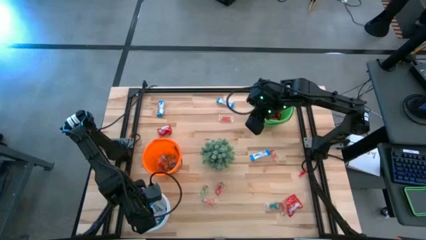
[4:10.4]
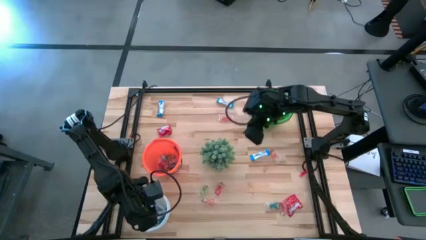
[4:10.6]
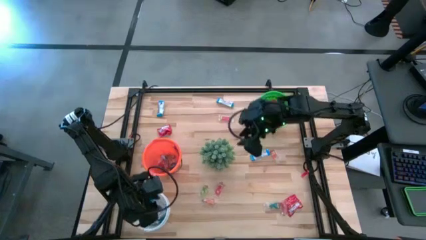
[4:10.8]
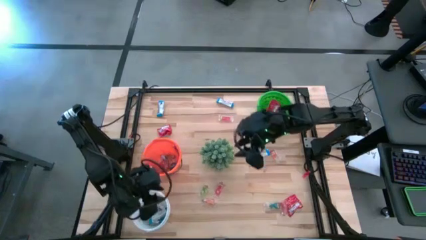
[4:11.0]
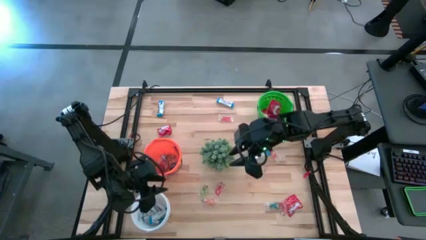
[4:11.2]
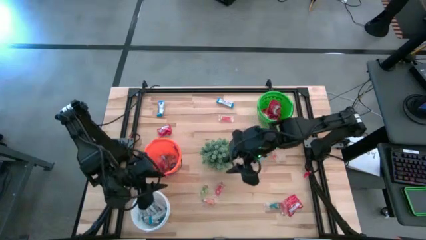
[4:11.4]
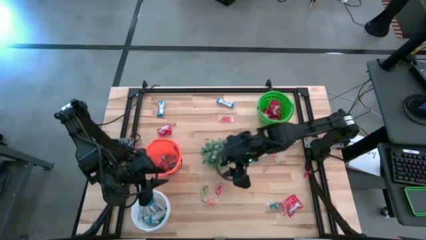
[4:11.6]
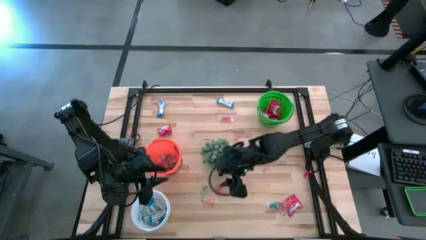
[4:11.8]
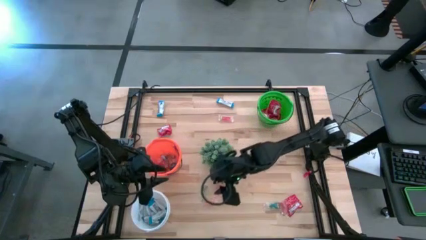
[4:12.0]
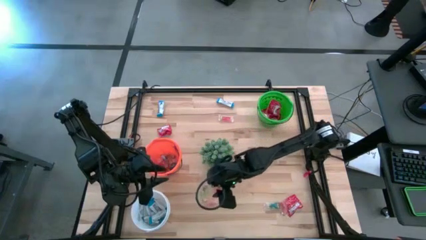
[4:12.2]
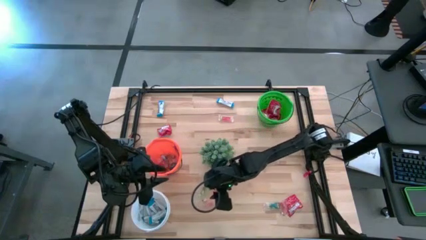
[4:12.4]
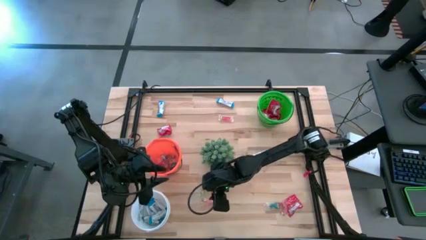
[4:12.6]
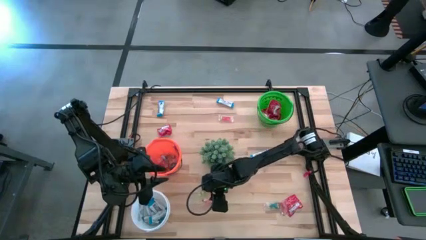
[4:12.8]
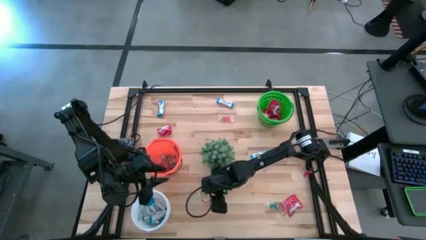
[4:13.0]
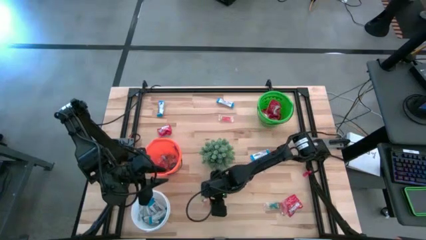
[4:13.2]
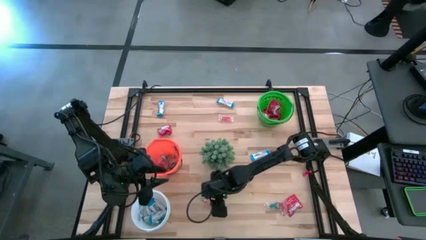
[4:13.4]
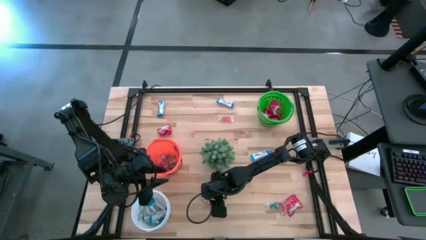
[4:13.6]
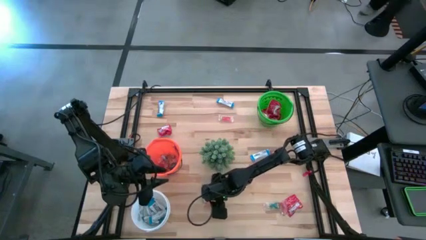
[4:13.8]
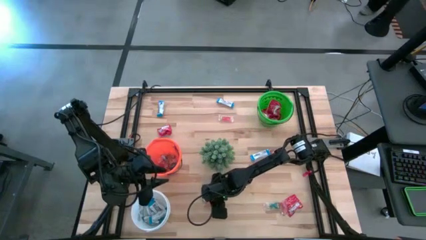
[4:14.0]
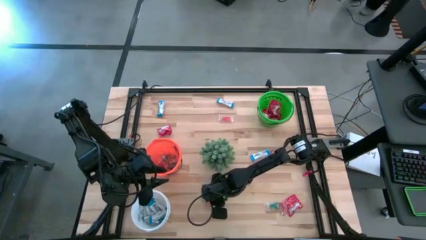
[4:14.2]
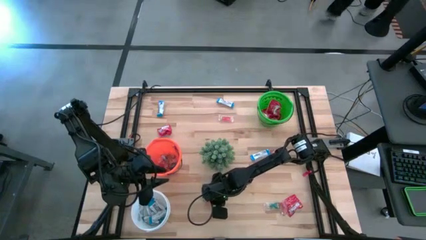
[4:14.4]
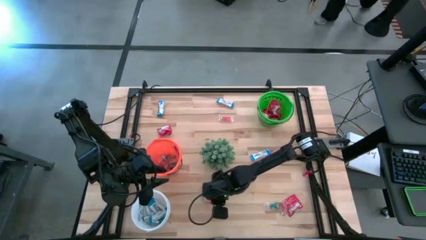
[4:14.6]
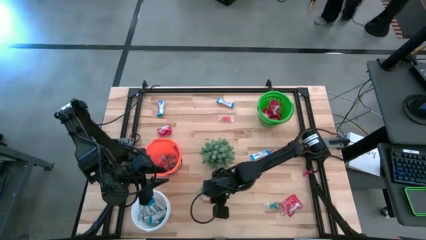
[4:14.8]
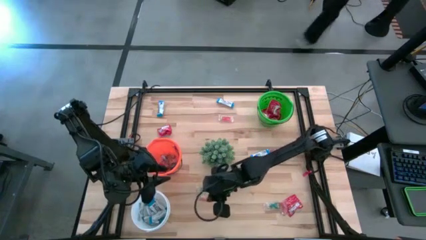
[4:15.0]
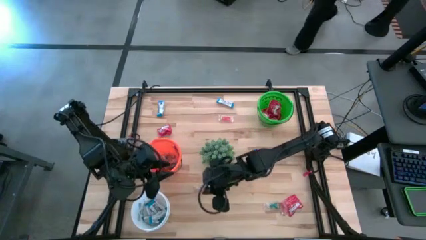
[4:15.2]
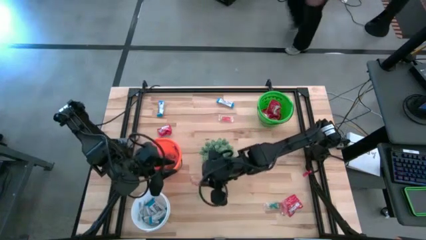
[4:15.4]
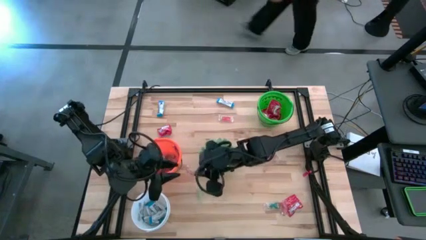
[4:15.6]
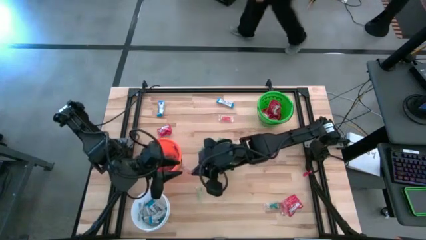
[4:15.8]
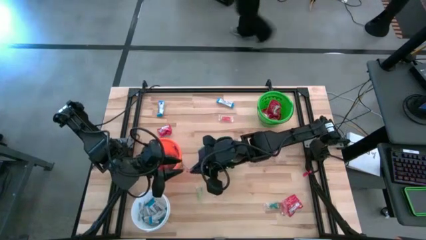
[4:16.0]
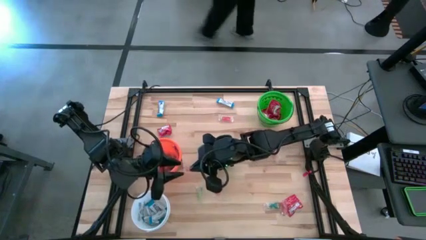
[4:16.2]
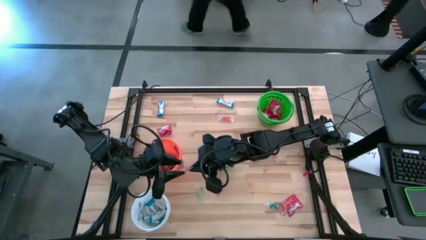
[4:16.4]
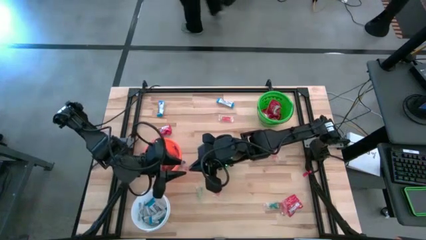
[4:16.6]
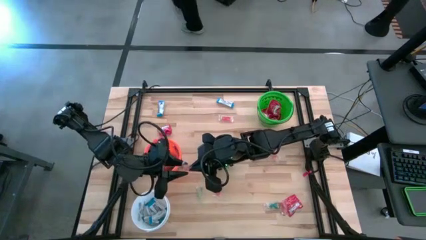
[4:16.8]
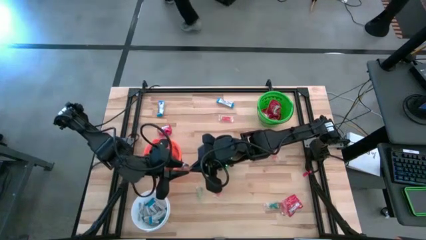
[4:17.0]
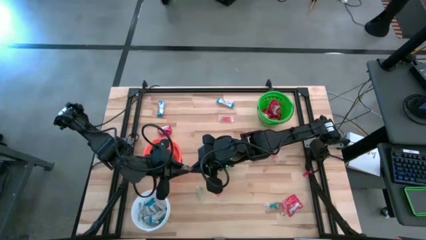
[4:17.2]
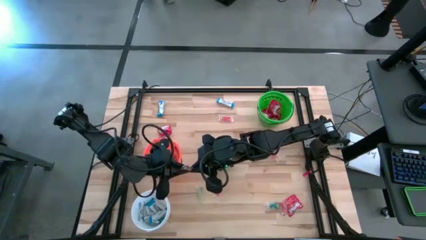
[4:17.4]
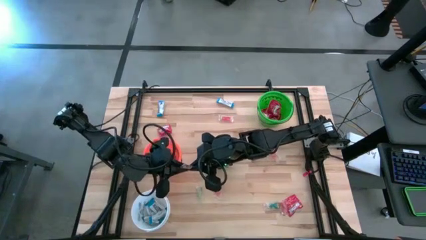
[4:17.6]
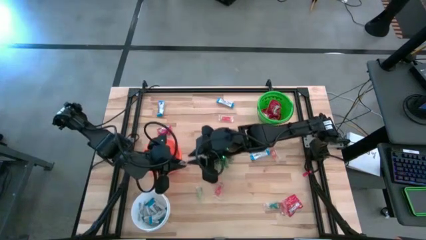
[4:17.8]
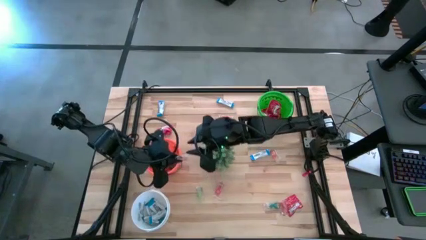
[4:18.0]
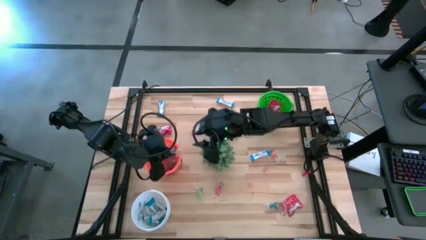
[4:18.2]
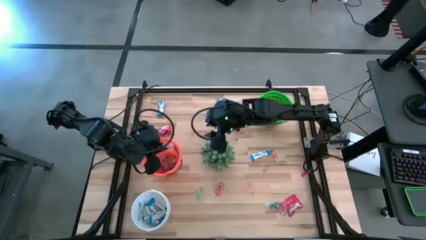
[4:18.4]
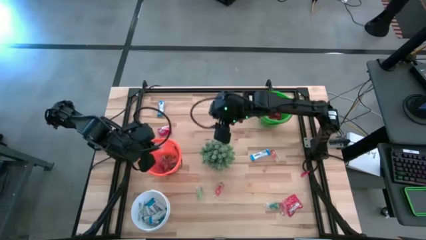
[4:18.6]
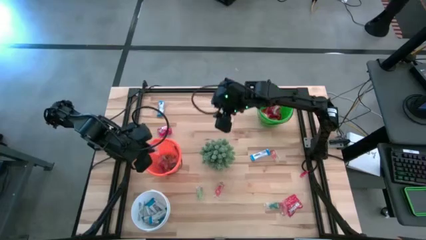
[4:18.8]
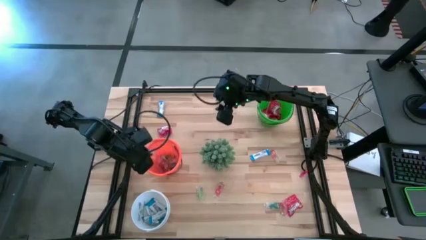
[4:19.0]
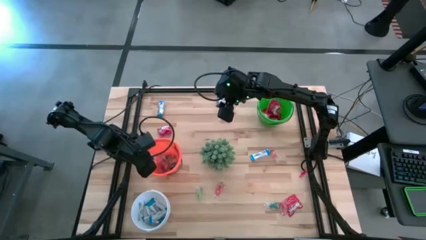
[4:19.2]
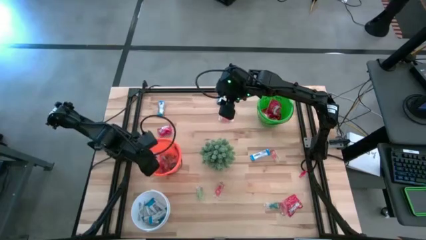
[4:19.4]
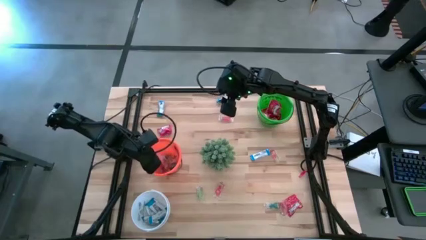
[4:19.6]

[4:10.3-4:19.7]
Task: Sort candy
Put the orange gummy into the orange bucket

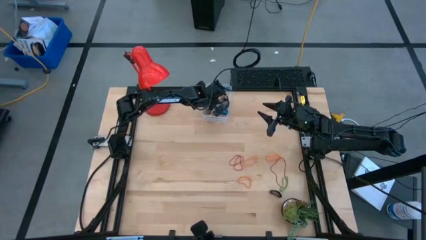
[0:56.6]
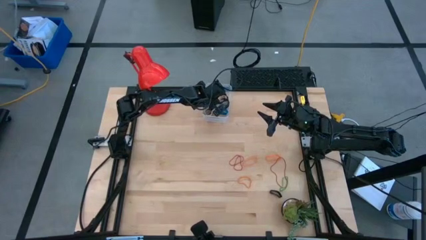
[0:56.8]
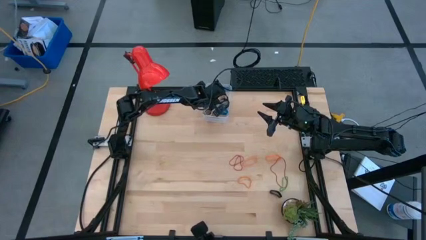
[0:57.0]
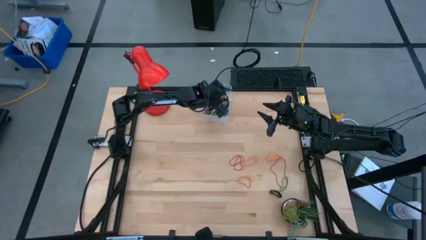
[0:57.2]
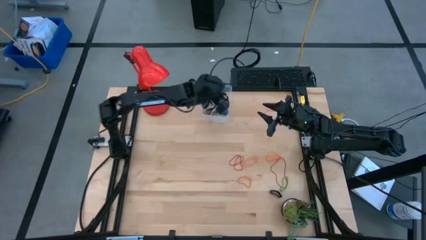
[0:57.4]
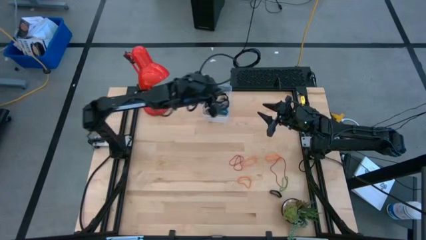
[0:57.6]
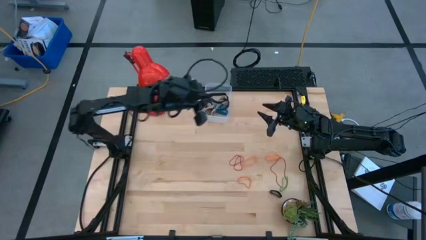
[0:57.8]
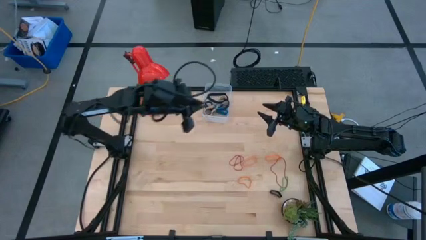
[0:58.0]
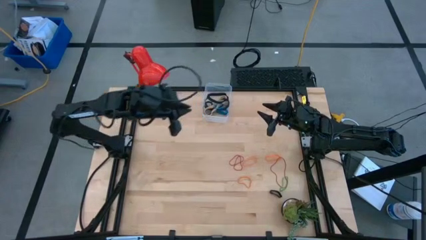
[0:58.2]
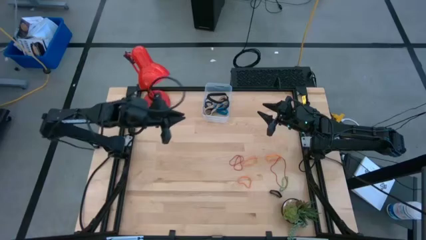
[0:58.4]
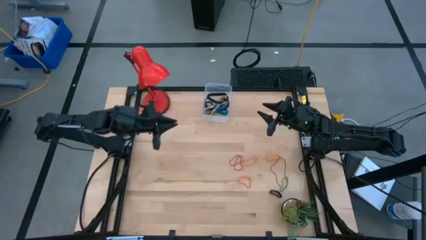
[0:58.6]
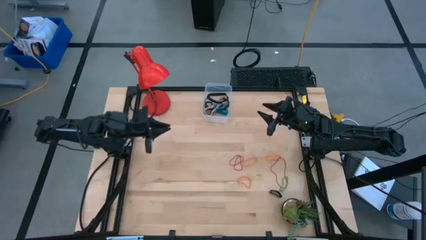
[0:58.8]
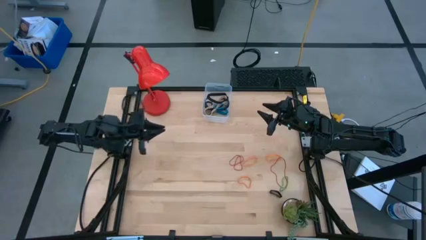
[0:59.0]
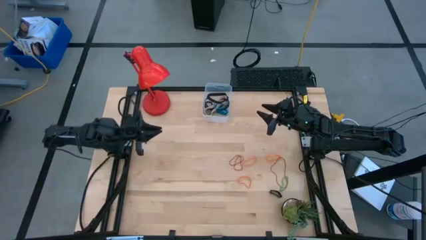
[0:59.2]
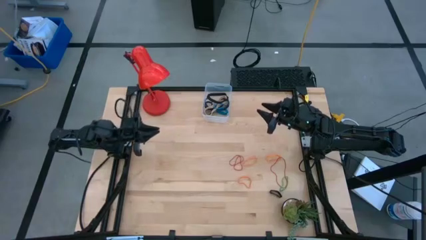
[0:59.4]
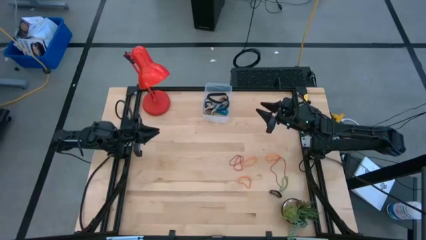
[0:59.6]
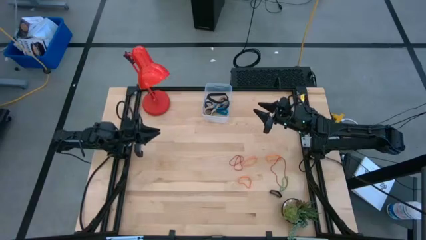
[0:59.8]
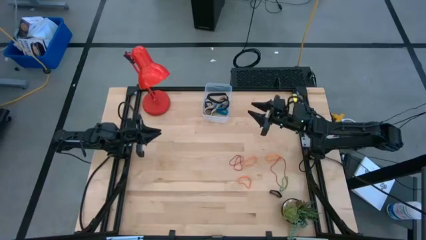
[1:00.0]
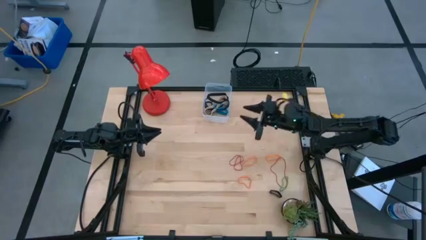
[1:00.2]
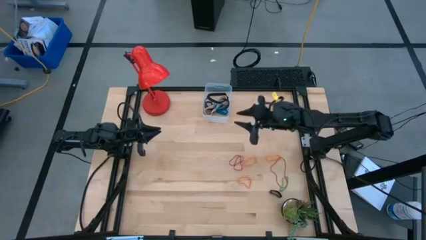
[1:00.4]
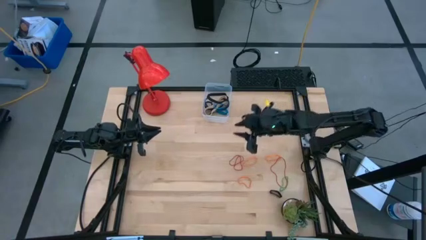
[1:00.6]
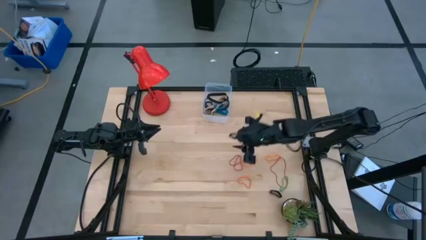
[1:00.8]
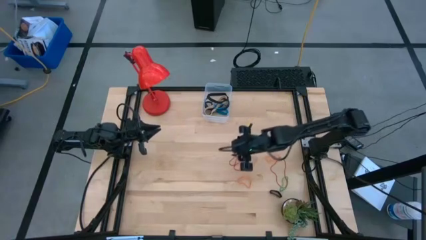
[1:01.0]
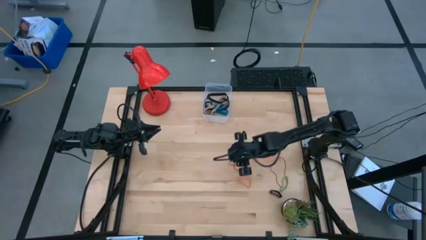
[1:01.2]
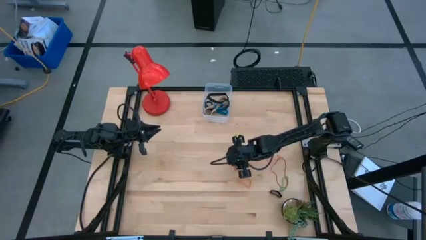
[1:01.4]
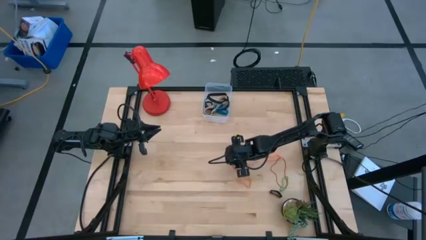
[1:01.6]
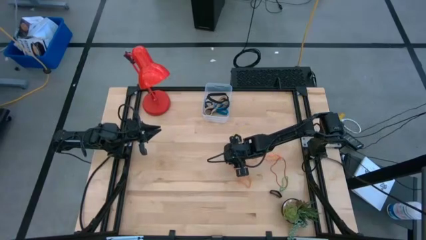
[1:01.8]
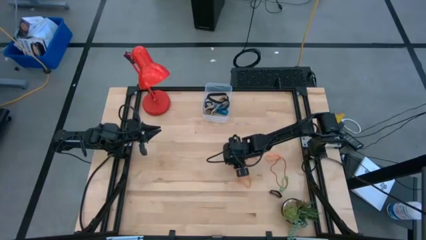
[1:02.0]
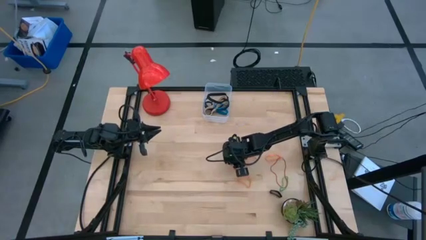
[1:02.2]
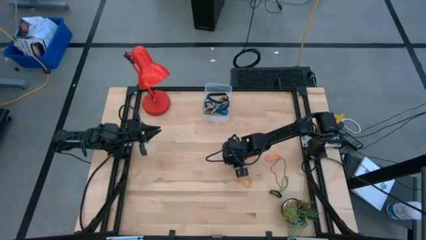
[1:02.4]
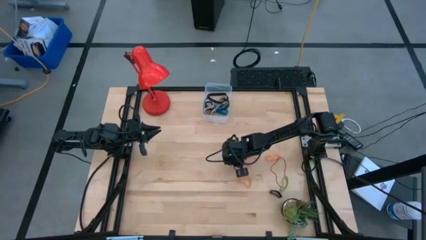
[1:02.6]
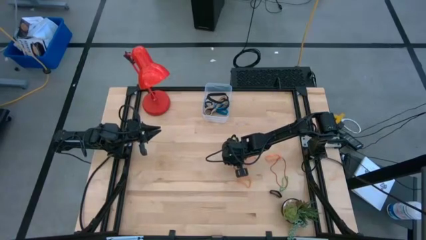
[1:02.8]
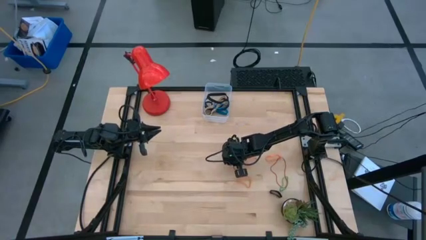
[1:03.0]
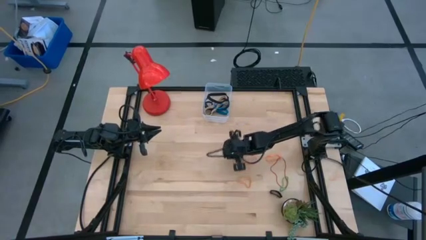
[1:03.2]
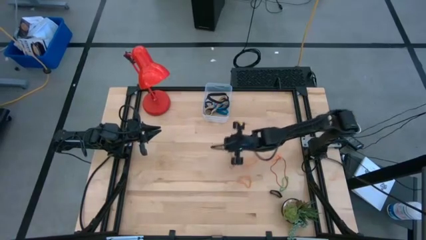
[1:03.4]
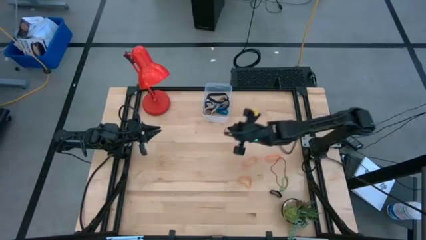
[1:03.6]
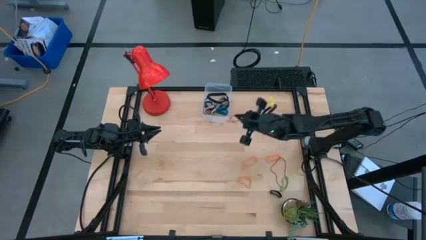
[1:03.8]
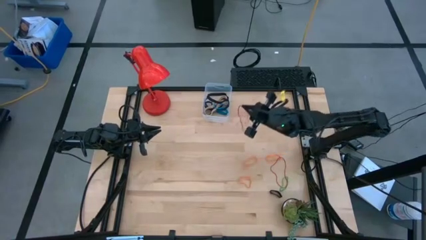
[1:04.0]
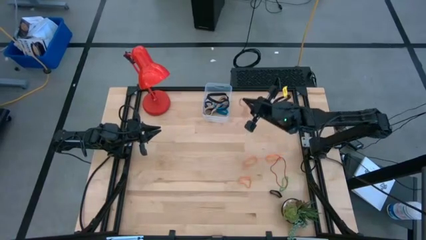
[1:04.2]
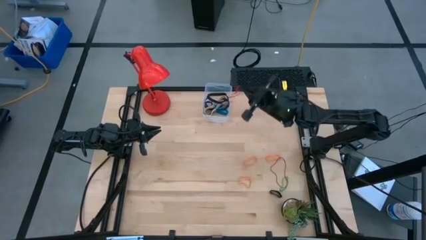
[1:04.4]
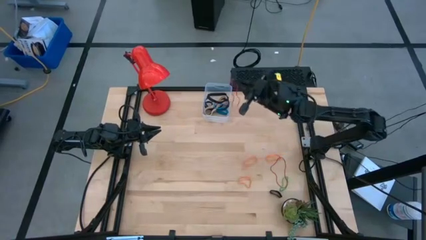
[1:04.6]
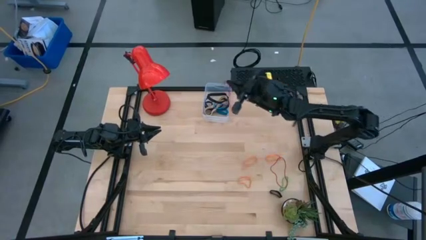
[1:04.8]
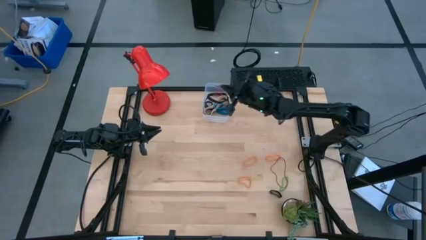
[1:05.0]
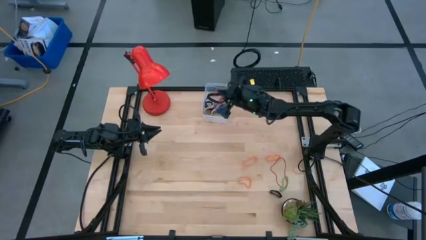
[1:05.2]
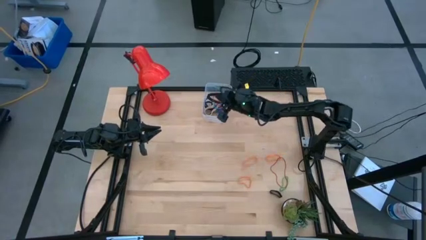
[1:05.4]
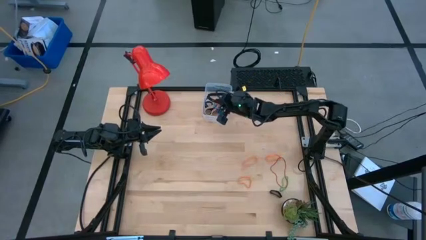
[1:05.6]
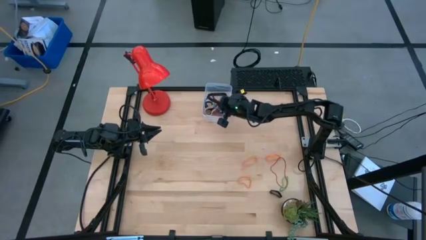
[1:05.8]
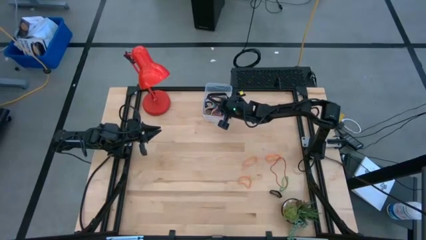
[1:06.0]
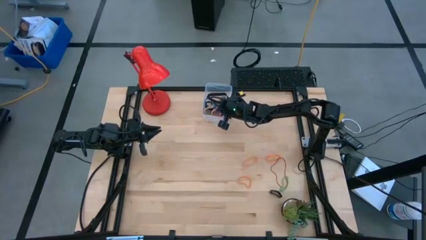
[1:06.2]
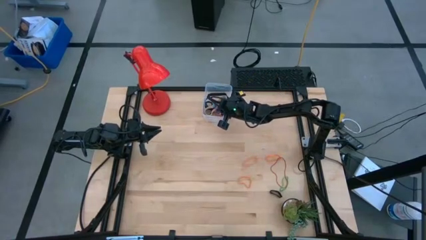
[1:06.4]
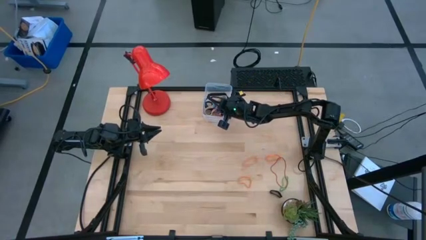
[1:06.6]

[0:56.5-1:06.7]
Task: Pick and place rubber bands into bin
Put the red rubber band into the transparent bin
